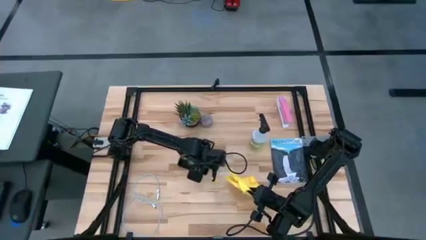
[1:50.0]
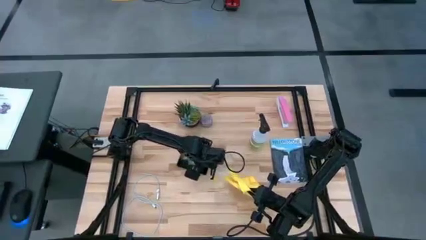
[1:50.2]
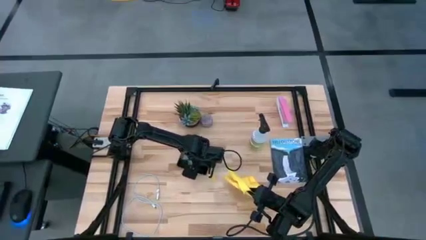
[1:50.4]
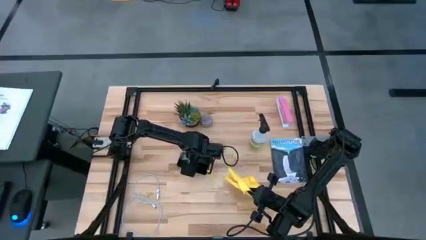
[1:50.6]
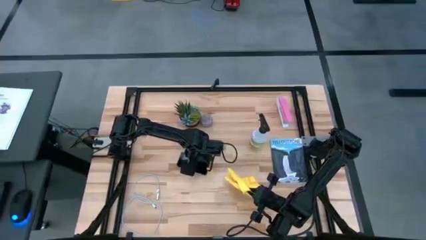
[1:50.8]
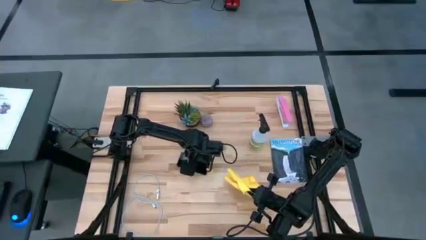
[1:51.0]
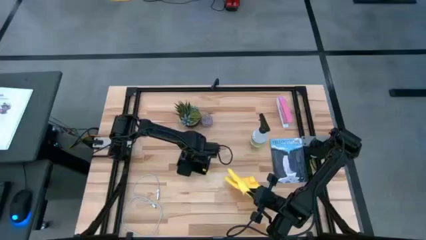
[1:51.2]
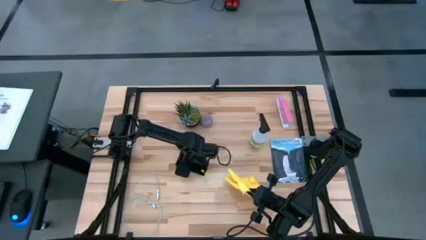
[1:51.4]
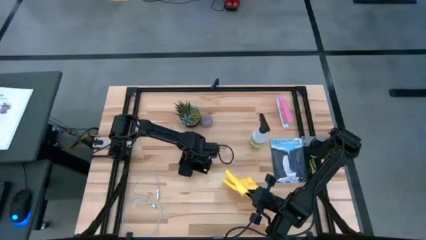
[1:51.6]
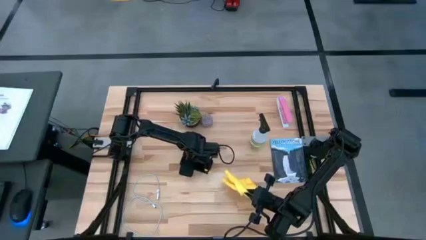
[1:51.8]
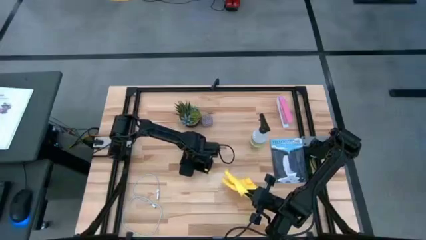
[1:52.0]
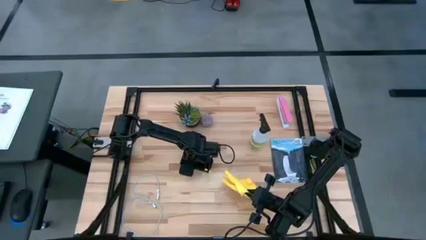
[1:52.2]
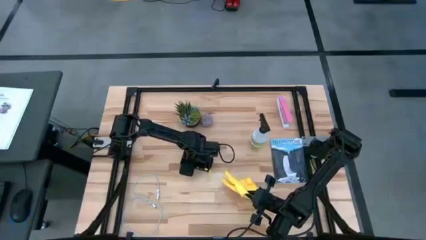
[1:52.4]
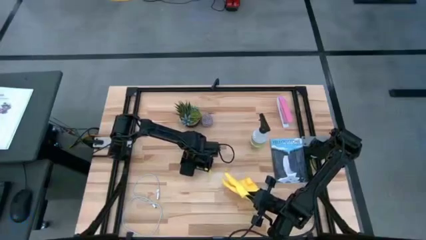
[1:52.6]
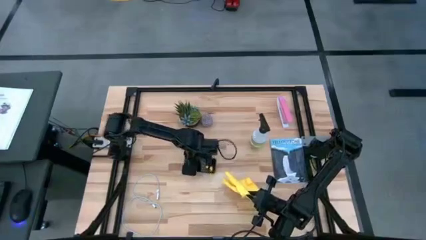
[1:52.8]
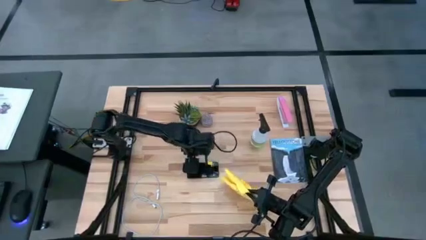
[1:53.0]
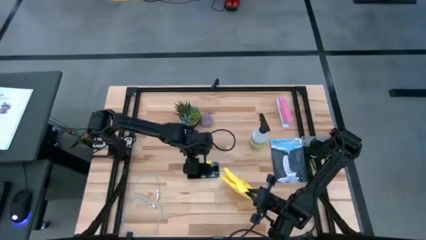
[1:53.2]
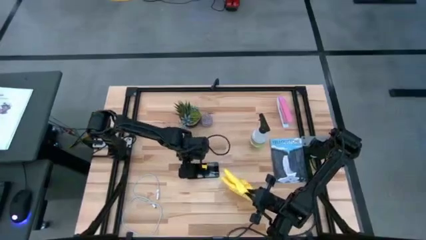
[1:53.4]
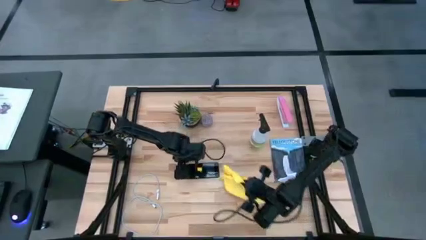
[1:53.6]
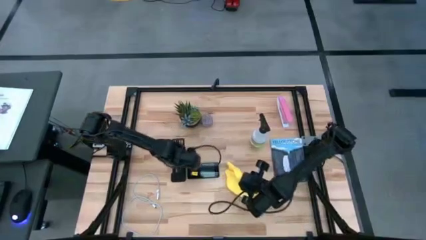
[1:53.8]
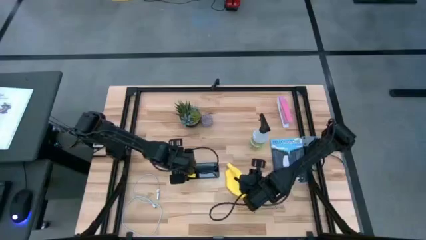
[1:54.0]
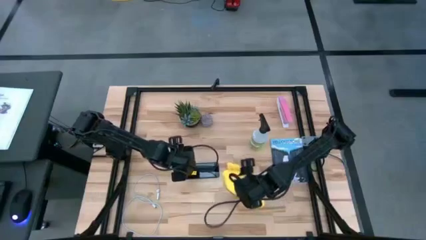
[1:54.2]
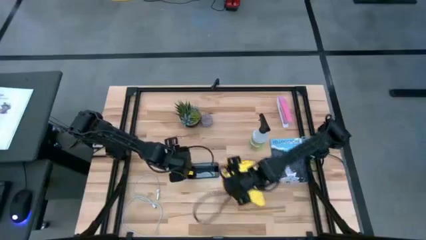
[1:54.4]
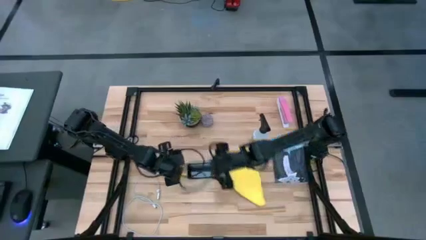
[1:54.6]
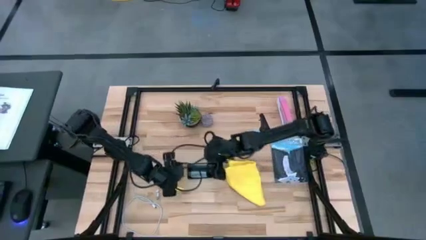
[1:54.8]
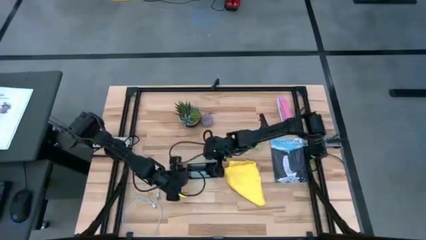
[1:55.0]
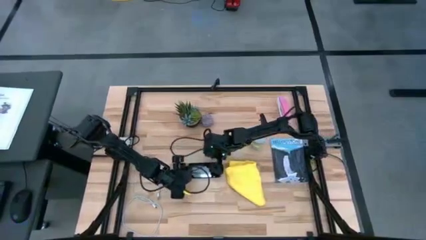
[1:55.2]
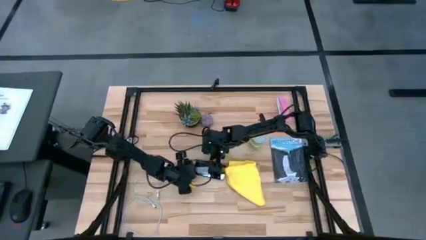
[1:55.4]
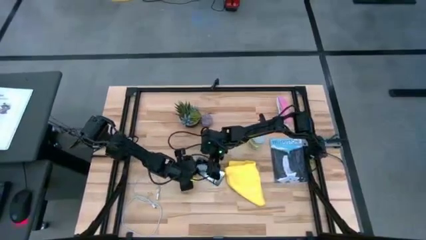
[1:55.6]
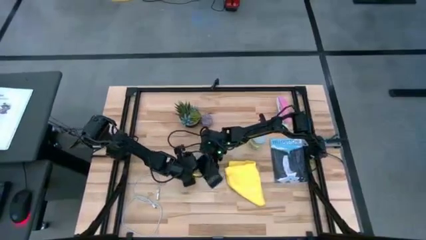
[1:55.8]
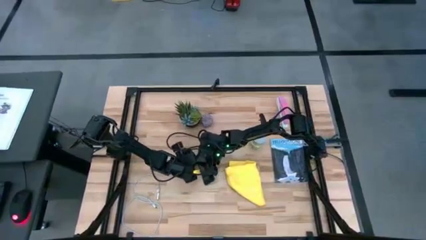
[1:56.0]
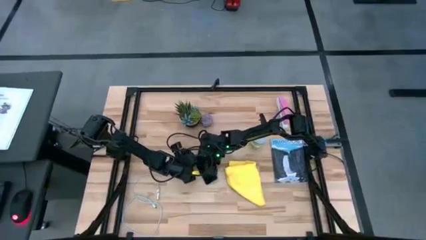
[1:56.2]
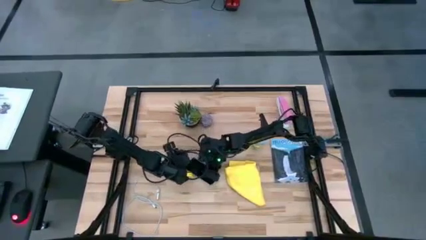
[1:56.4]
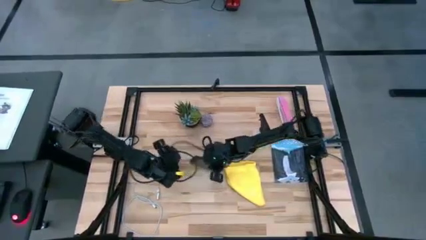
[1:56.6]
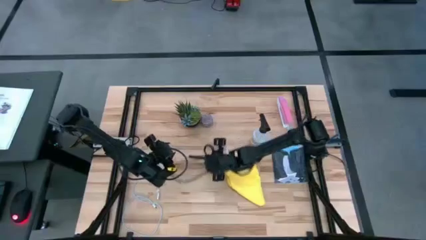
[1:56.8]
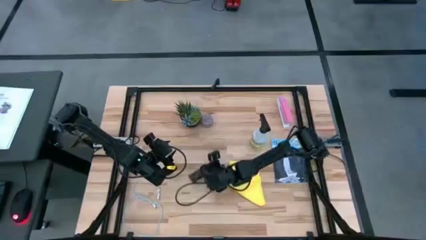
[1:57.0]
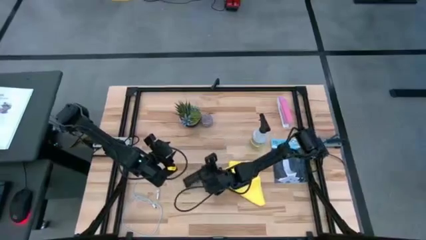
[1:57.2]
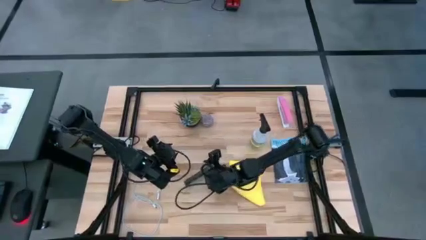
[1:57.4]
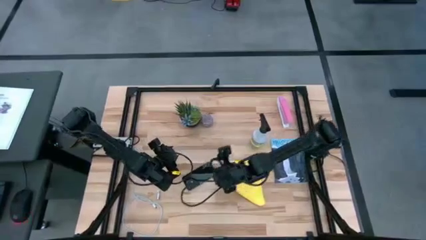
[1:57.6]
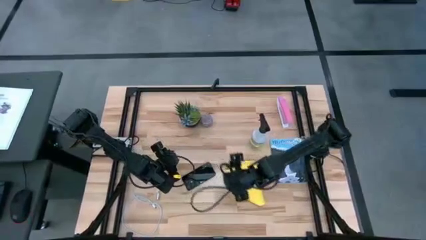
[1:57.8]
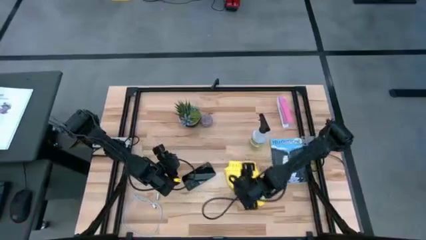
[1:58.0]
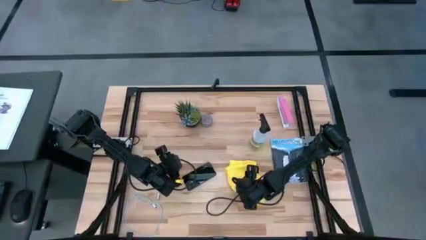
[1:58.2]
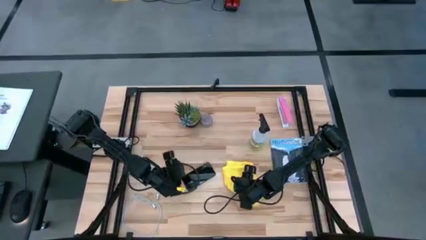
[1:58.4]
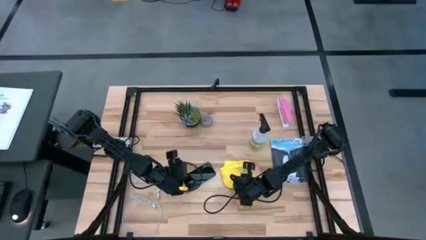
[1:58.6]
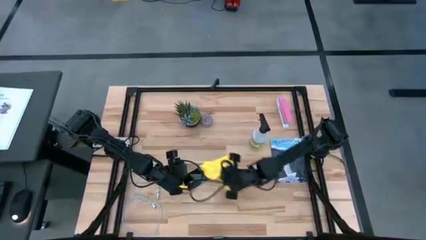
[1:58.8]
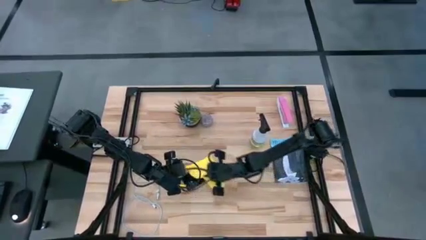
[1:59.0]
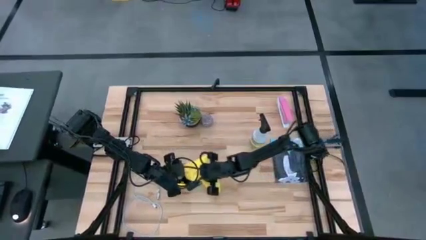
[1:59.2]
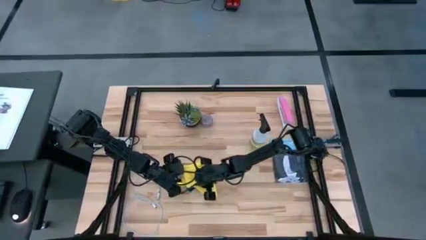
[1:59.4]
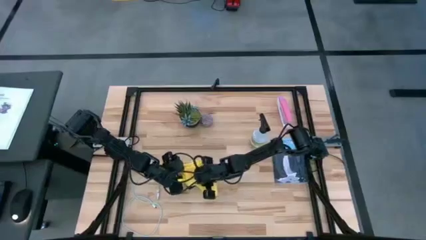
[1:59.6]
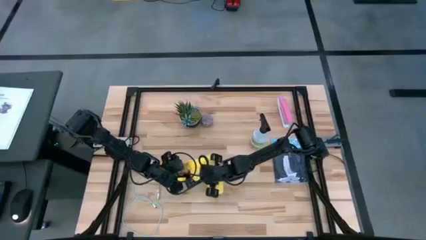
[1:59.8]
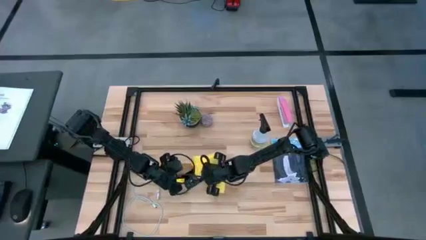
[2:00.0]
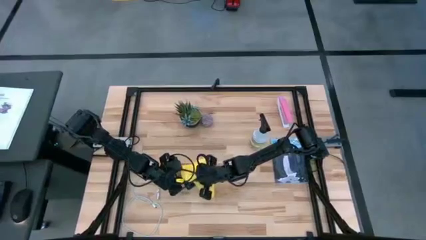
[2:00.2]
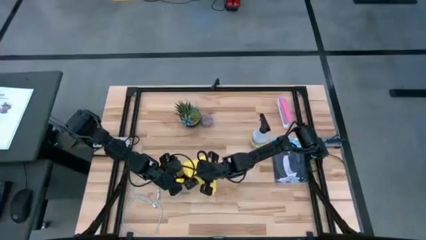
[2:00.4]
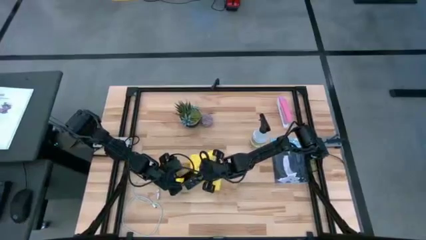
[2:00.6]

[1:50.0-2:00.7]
Task: Apply microfiber cloth
Wipe the back side of the cellphone using the yellow microfiber cloth
